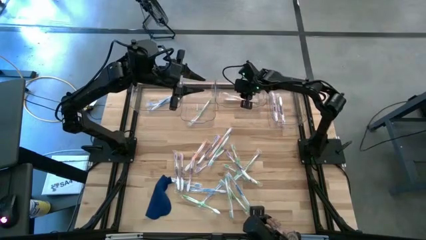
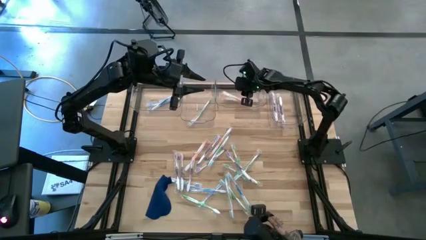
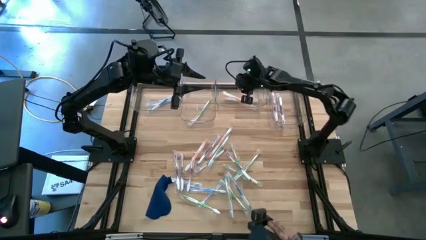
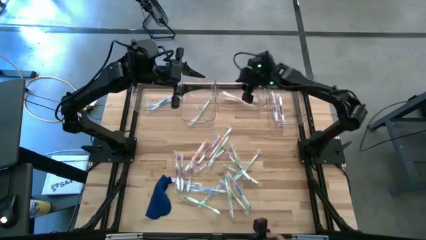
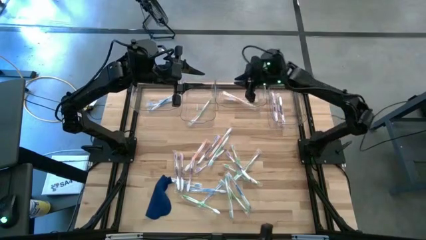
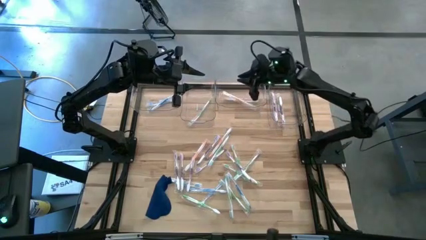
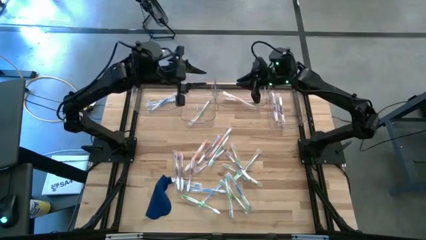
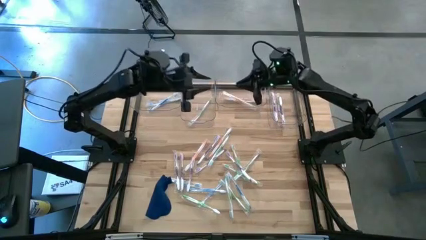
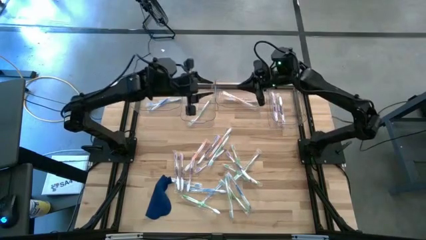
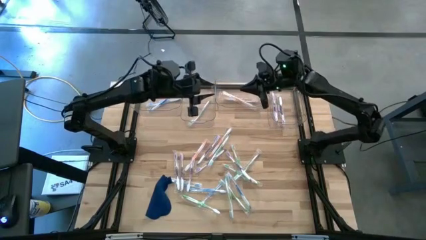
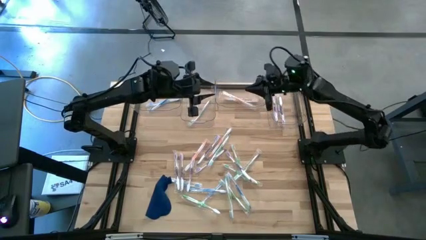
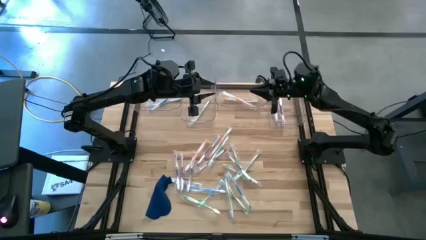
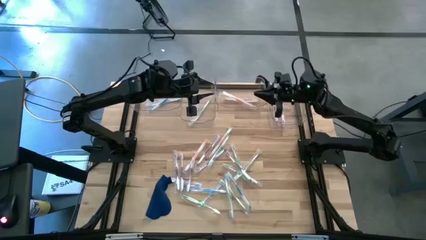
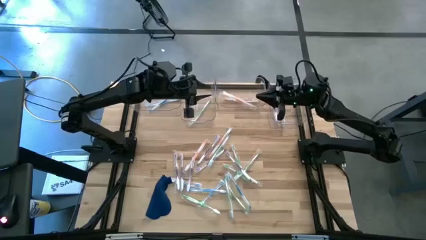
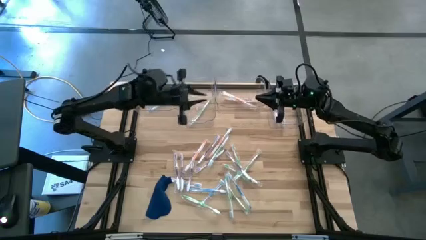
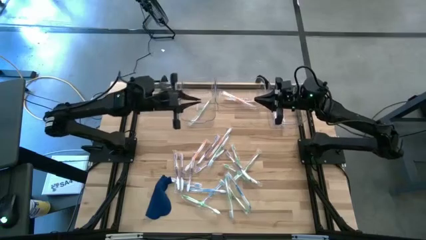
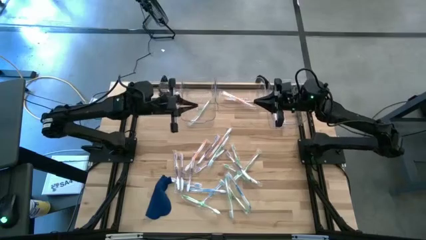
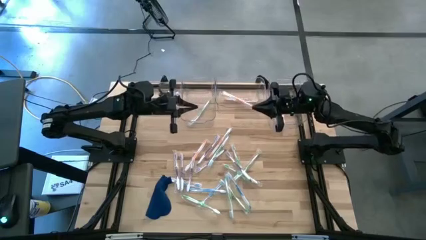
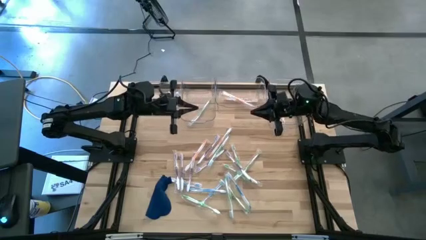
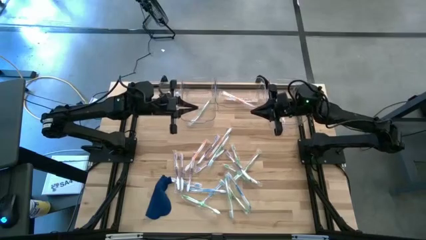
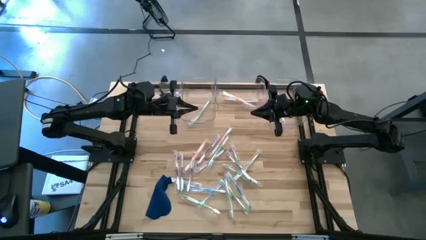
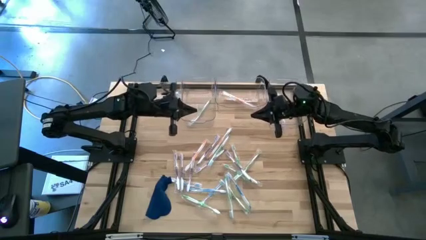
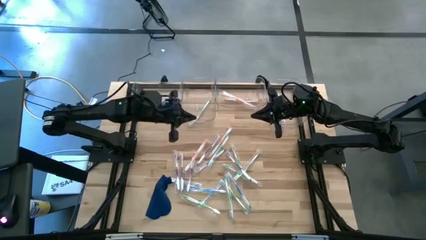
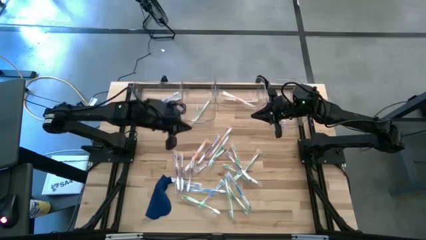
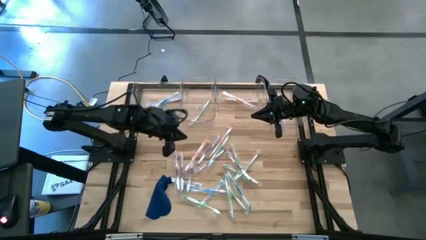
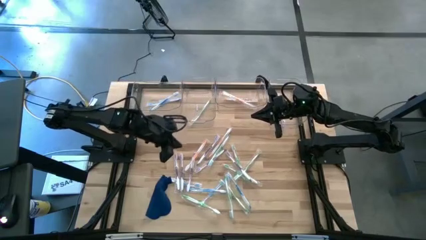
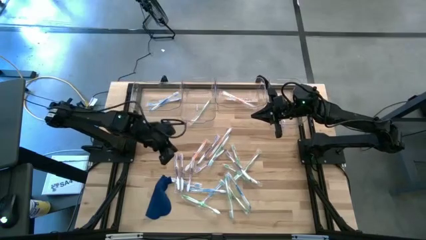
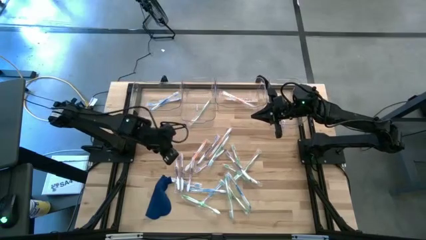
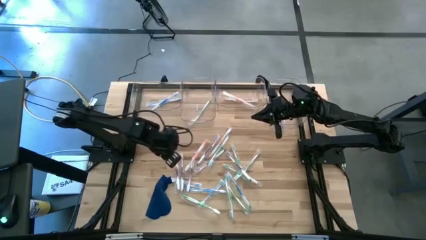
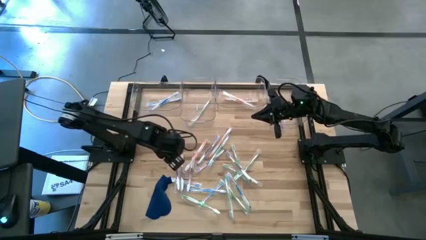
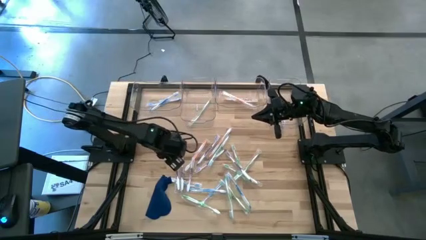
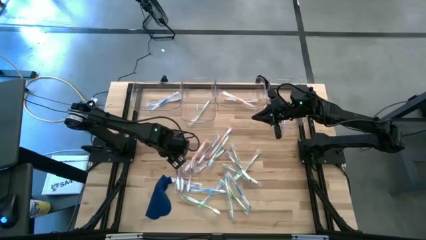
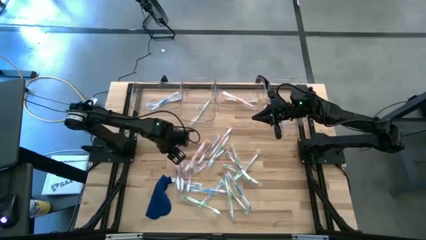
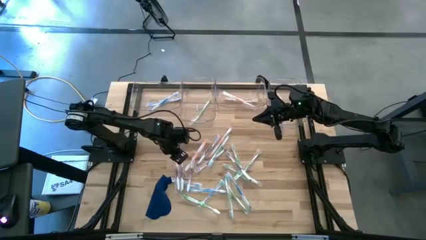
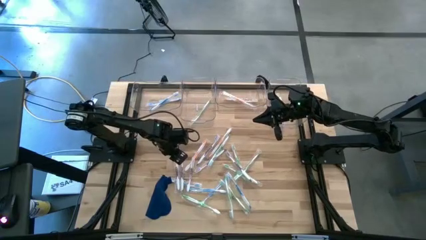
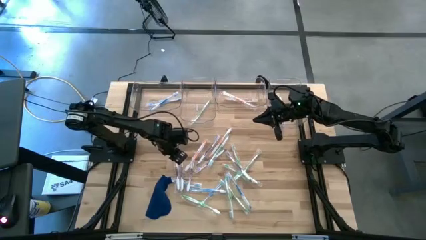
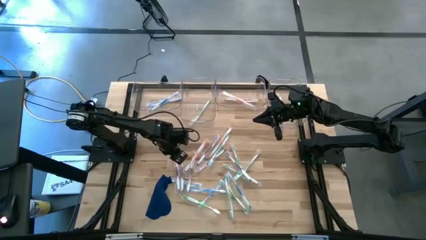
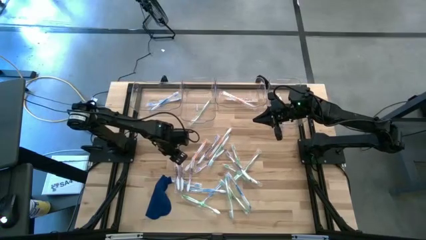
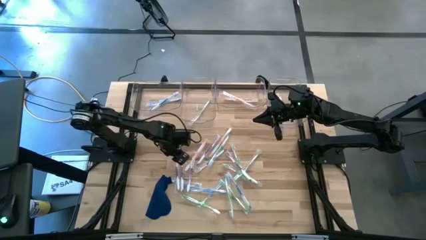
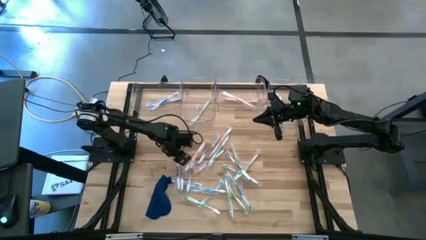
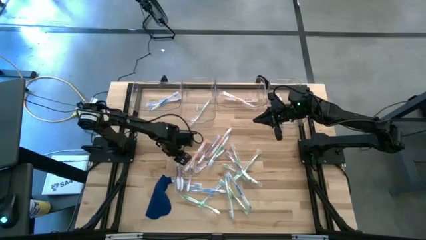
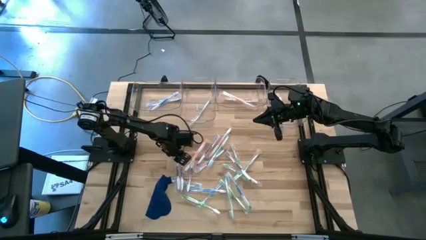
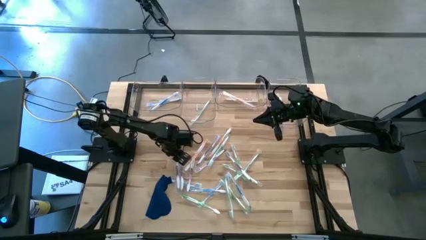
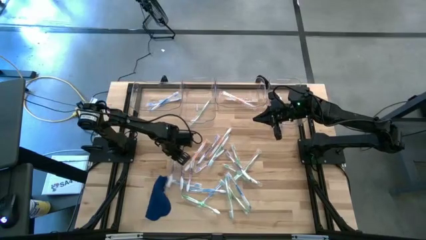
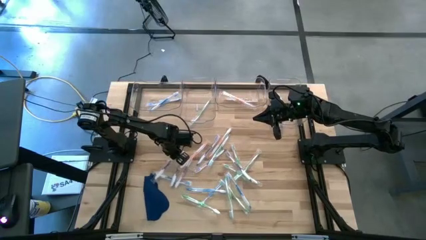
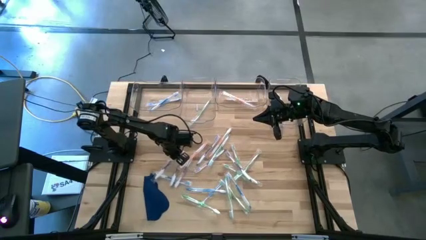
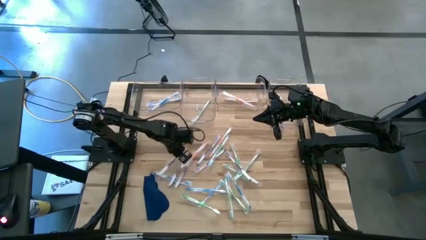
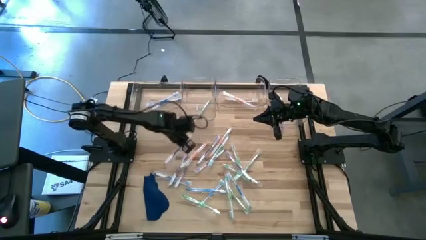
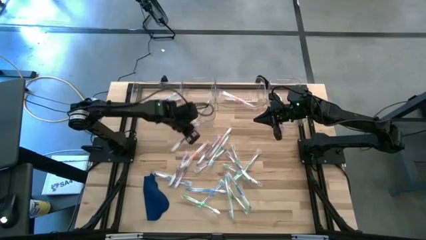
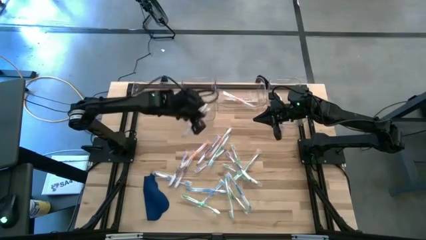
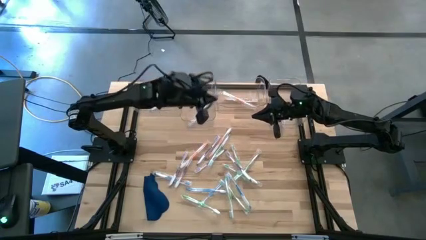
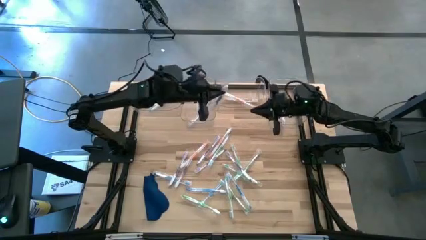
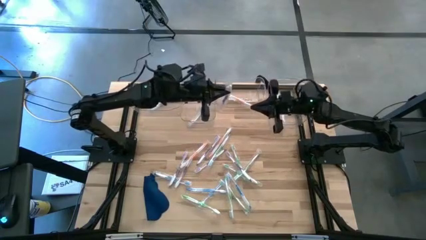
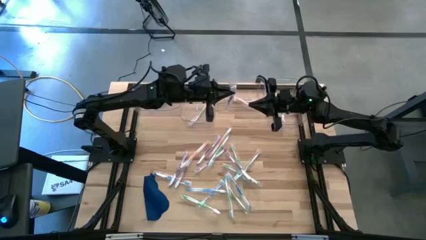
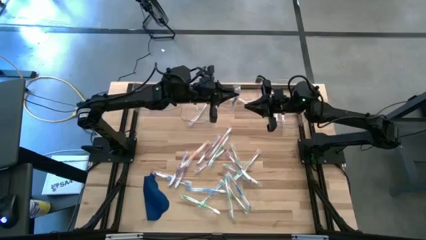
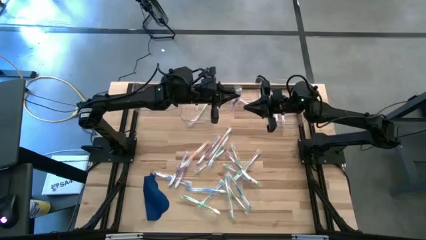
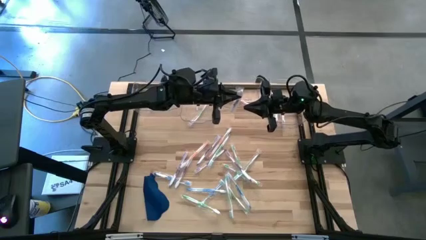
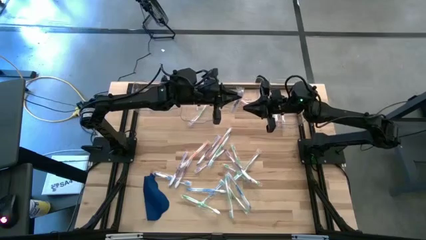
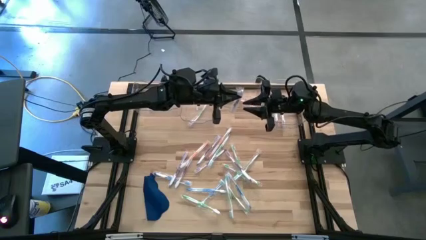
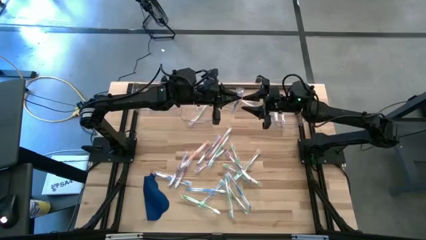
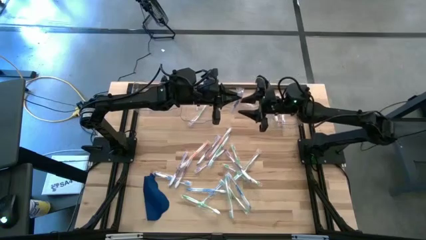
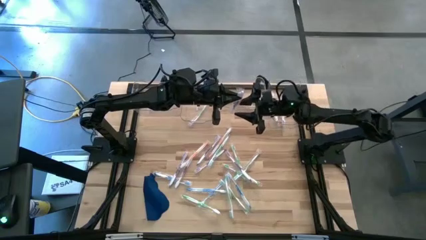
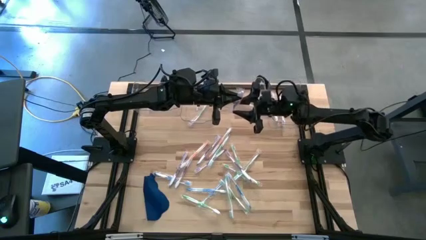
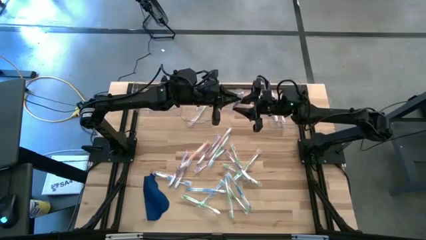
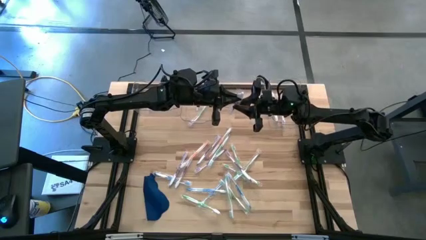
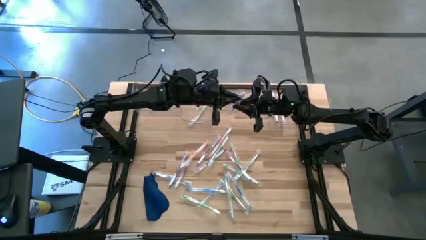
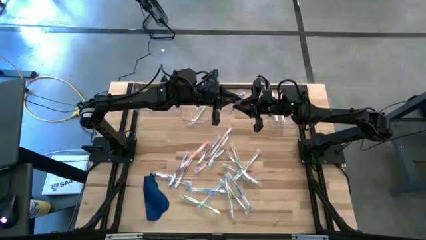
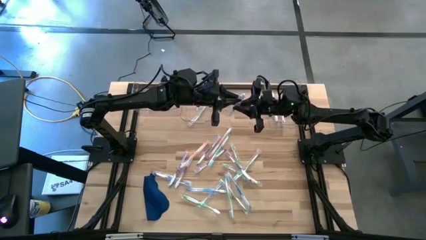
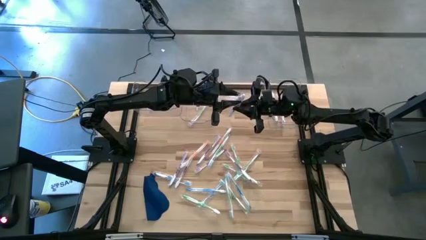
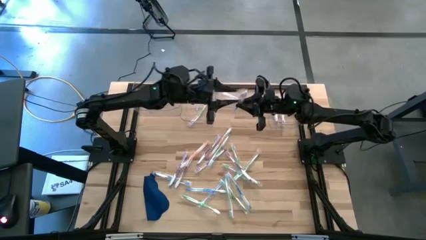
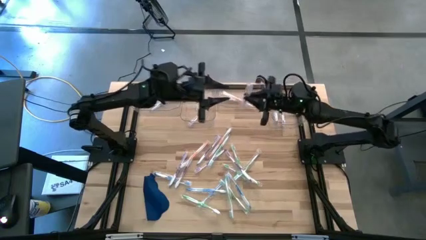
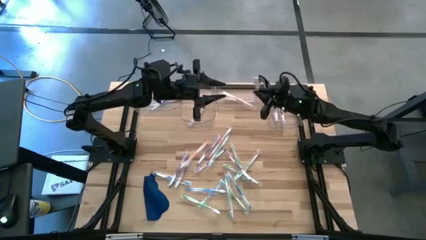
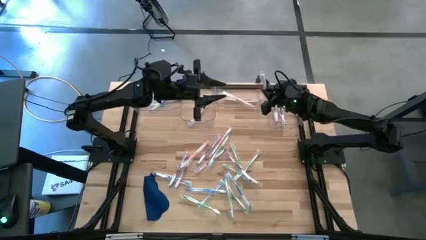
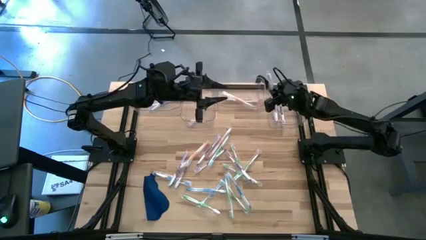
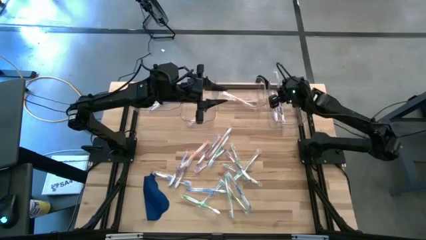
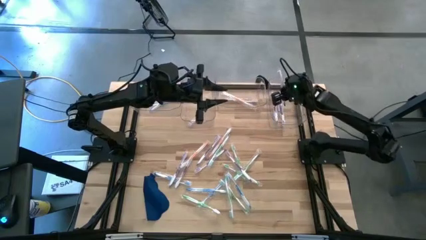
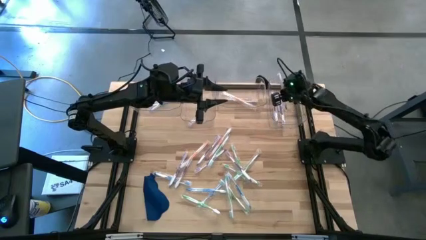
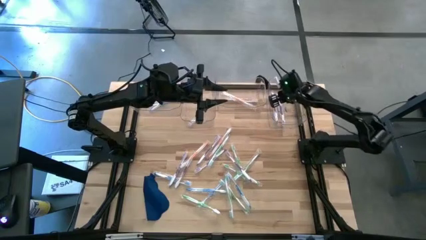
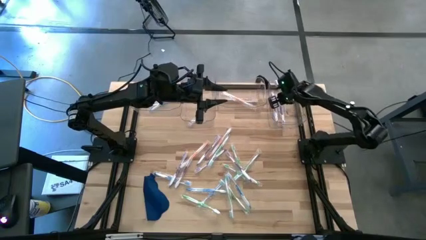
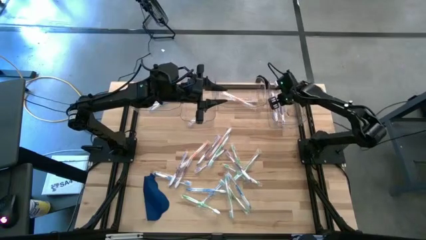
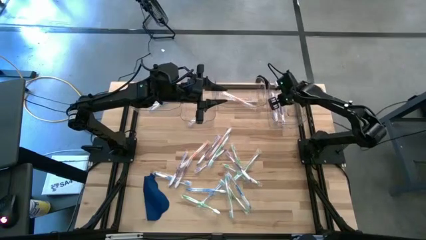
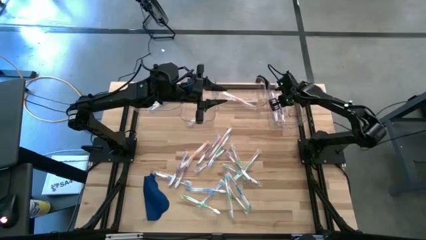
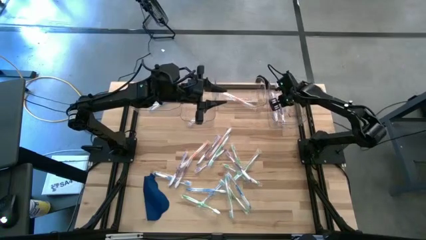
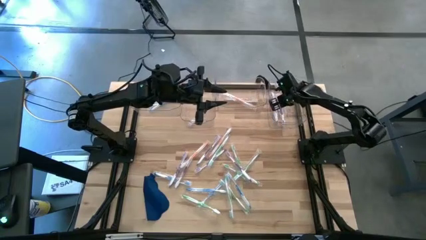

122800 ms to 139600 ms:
Task: Pick & Place Toothbrushes
Put the purple toothbrush into the right transparent bin
